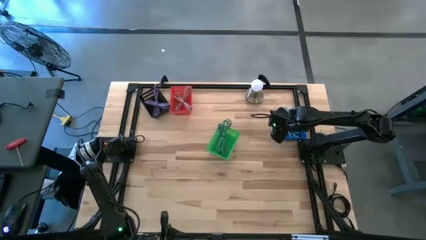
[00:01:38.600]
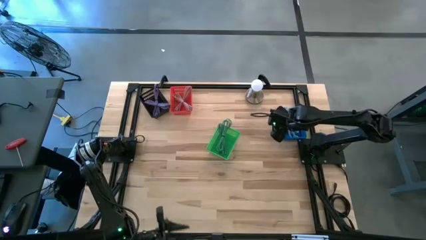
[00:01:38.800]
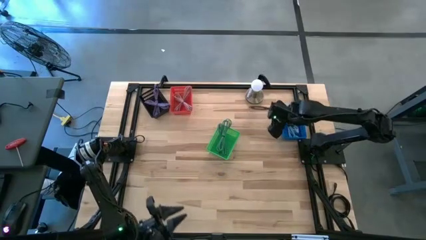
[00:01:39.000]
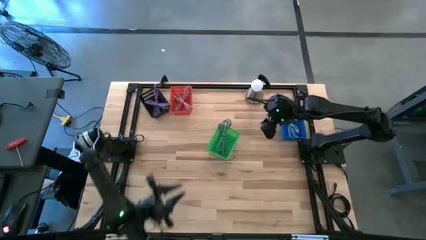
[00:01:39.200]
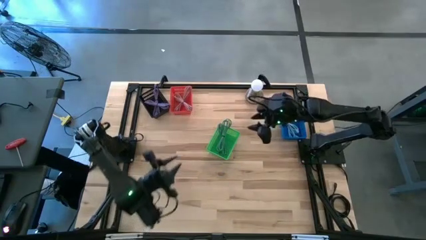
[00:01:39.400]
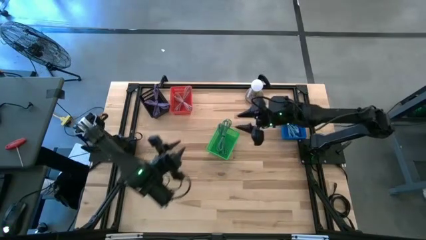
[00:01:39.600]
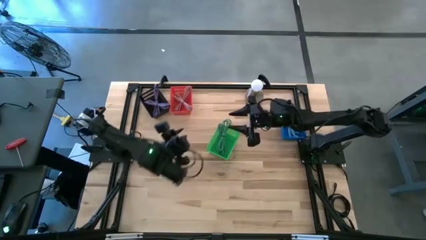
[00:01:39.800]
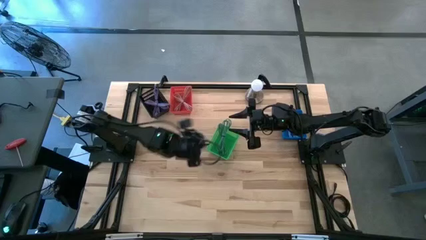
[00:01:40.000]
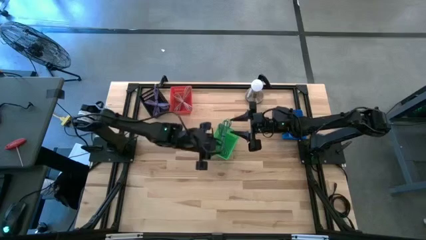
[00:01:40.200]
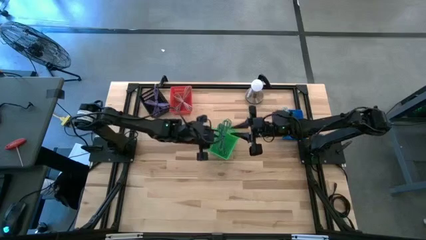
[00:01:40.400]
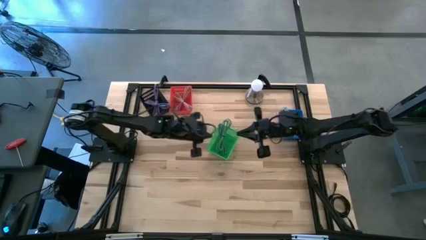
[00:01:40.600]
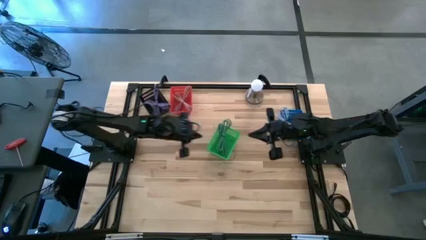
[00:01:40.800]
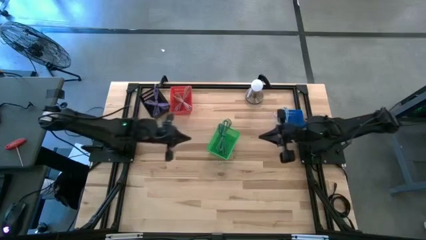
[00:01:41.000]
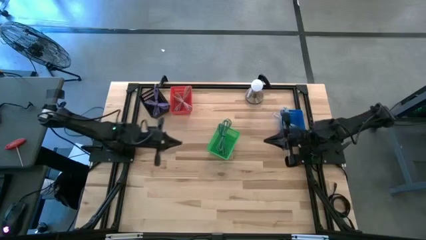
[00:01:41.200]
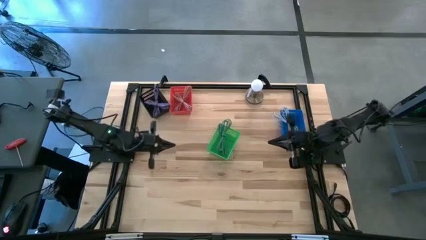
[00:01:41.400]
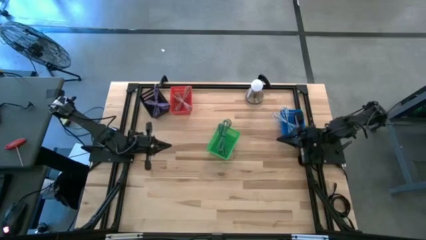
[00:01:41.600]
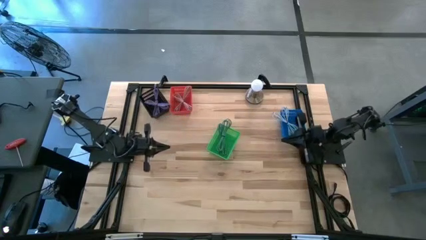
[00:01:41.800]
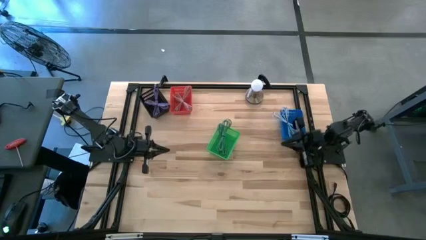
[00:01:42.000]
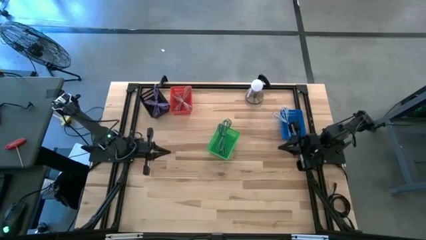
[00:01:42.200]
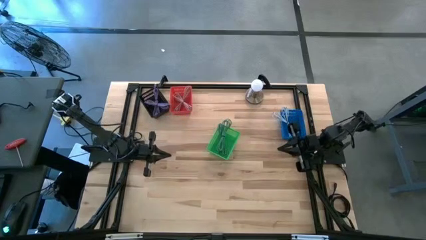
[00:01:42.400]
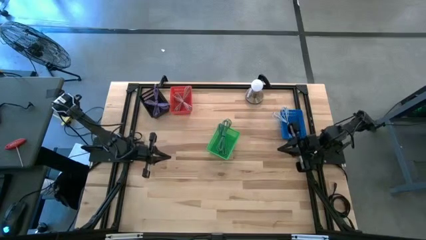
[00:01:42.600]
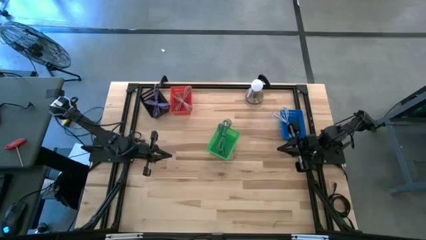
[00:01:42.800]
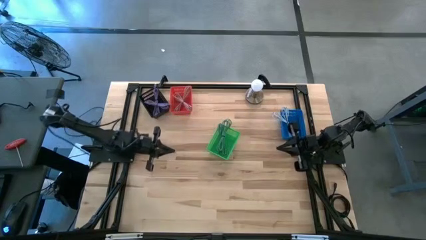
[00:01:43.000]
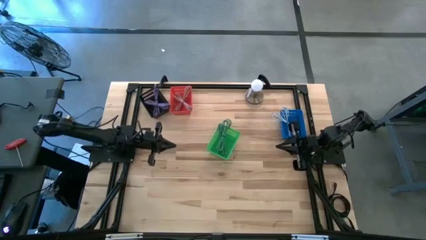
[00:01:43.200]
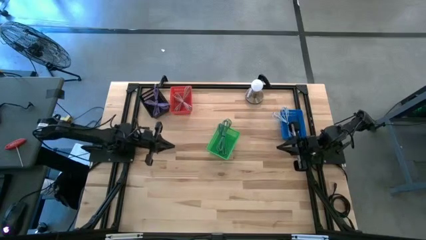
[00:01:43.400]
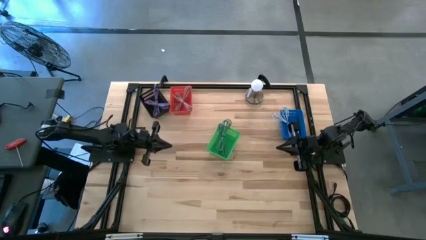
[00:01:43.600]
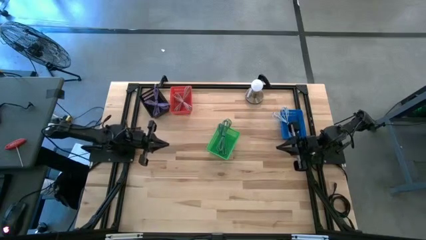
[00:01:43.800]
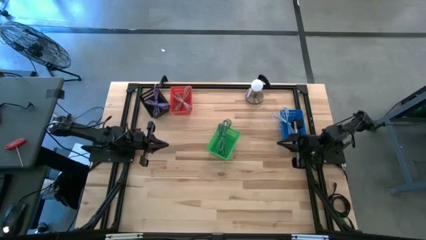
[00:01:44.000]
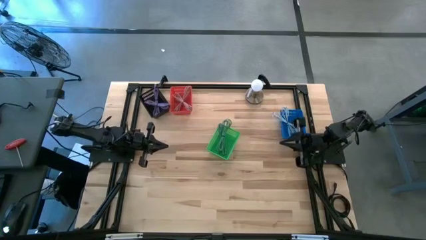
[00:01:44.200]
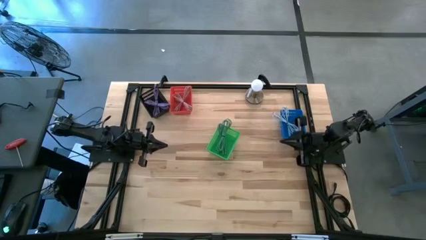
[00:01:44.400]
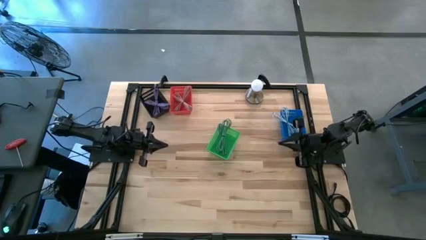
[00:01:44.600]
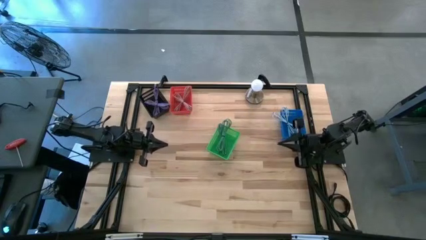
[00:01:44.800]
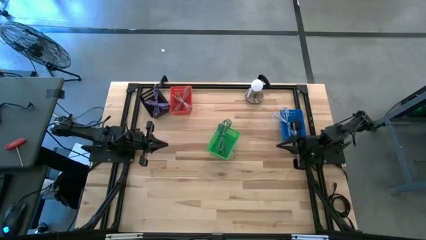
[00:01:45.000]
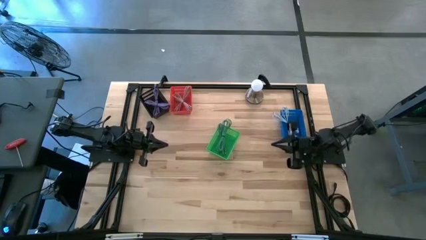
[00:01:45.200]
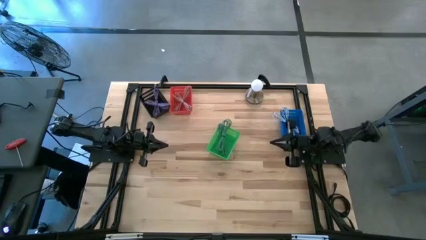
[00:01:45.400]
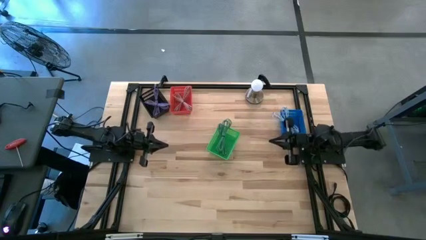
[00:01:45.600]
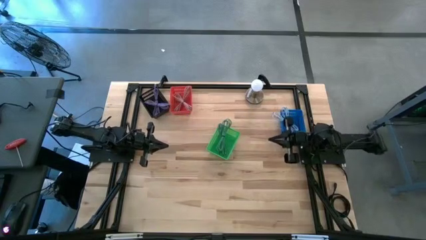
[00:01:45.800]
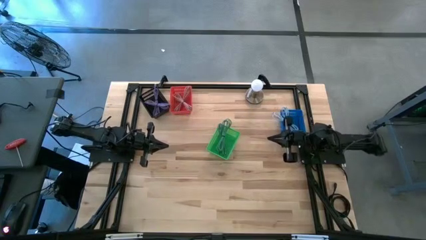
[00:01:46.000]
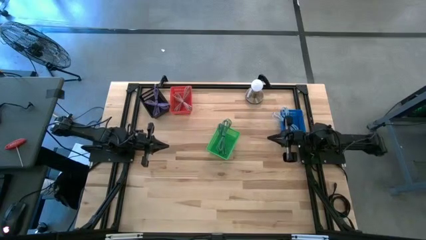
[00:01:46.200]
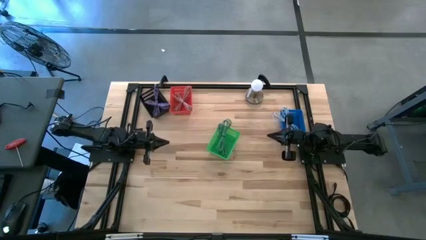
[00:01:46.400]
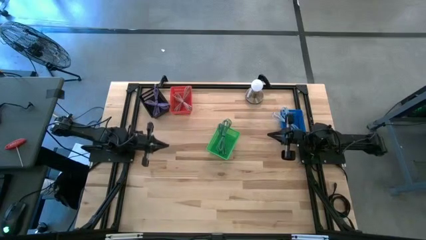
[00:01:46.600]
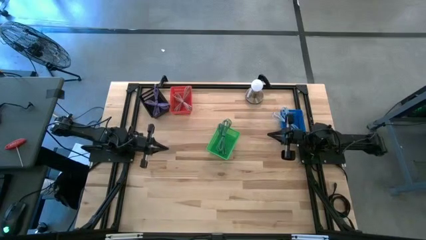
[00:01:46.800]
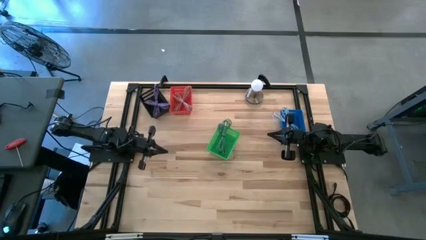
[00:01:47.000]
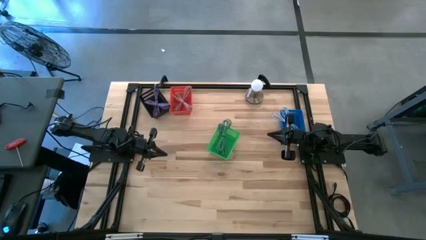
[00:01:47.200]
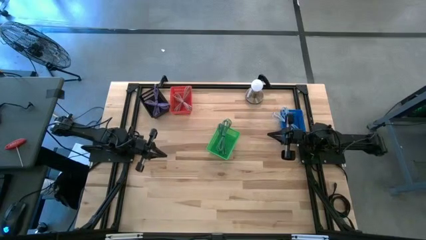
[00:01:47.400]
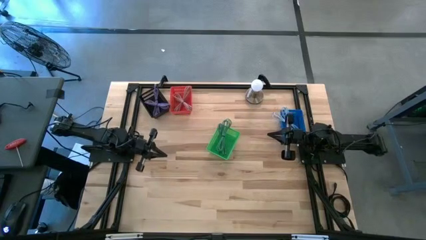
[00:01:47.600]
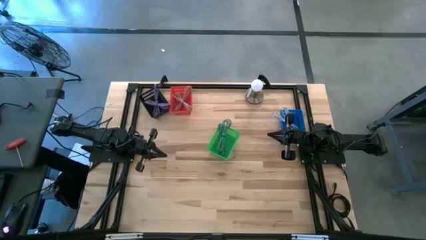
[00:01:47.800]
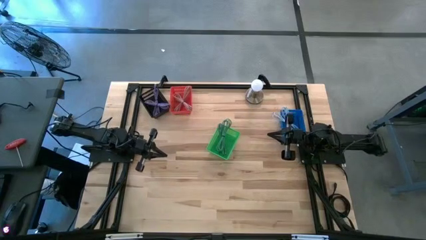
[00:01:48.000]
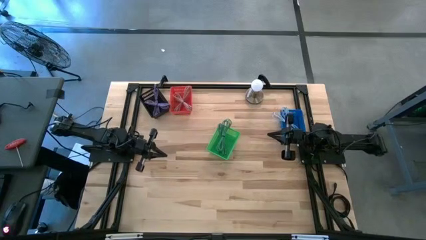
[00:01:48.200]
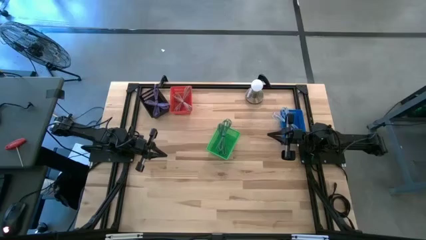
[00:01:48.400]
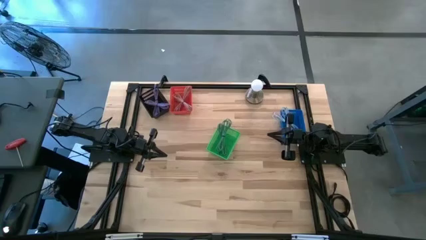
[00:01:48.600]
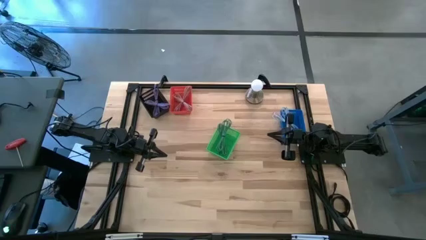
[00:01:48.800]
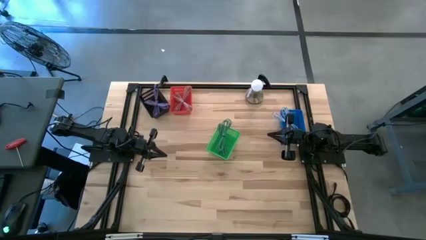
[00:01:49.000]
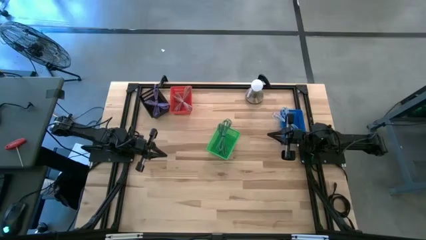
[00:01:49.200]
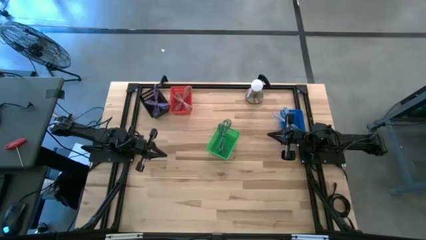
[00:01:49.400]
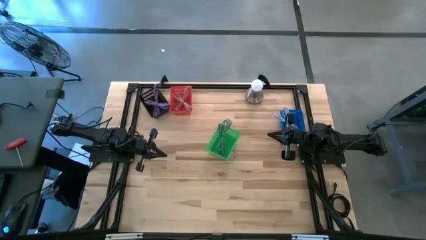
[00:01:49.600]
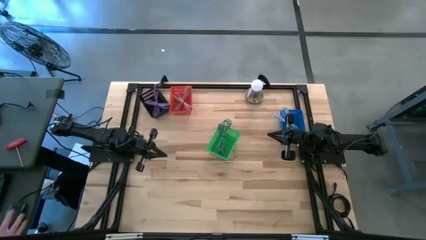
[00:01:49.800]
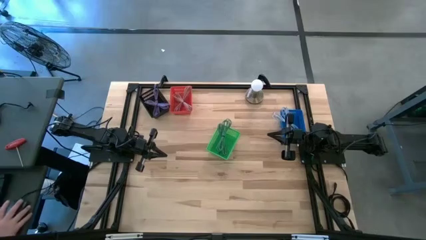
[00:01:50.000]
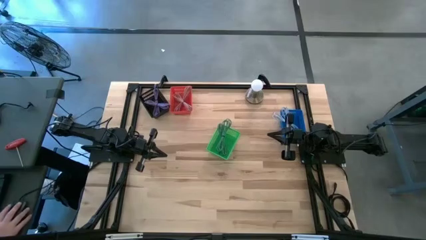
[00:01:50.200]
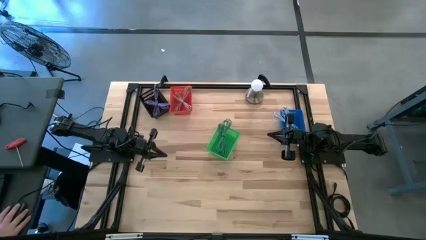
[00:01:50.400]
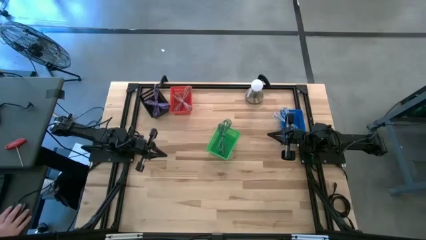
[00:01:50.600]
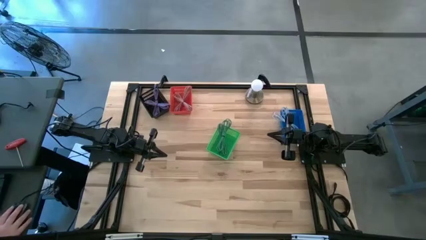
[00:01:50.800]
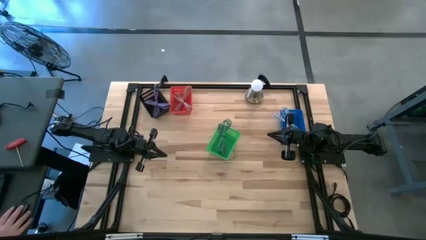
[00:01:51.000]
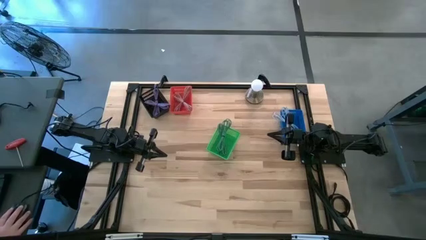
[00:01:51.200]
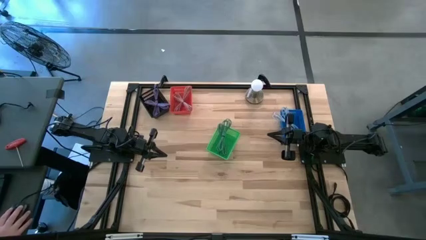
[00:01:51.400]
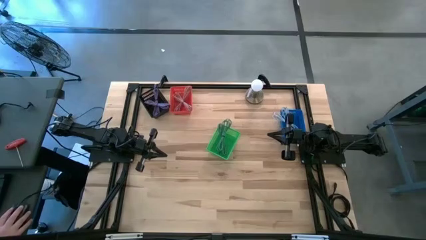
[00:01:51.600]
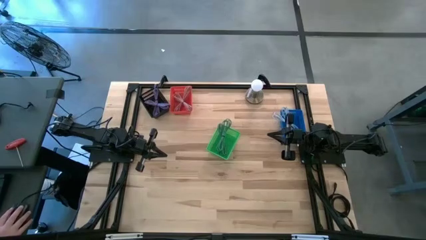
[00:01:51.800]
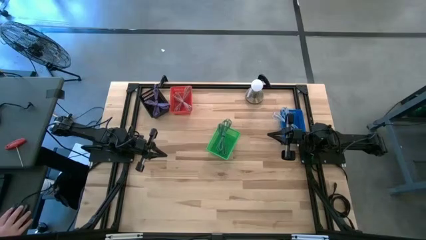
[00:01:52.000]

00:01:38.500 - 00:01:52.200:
Task: Pick & Place USB Port
Return to Home Position

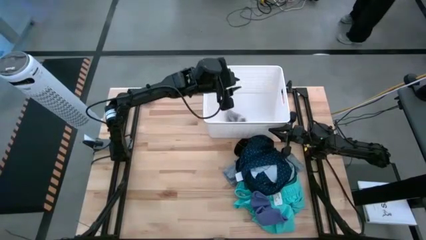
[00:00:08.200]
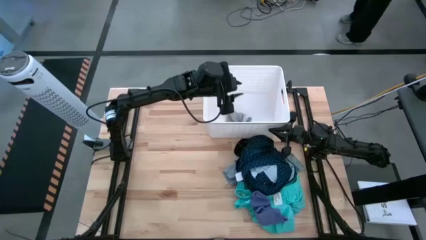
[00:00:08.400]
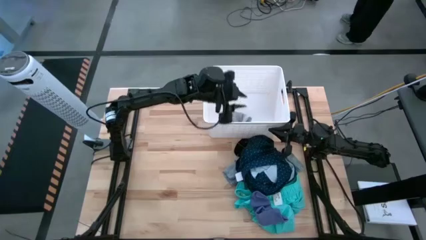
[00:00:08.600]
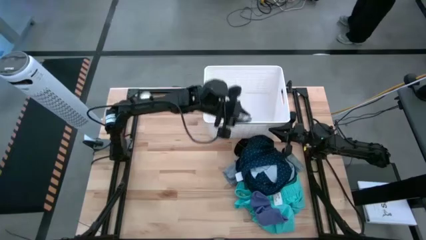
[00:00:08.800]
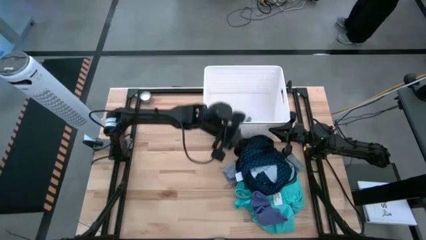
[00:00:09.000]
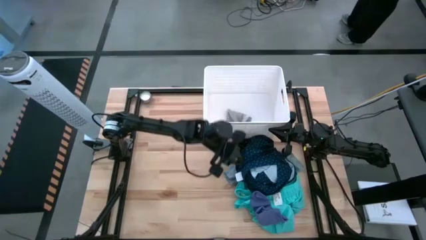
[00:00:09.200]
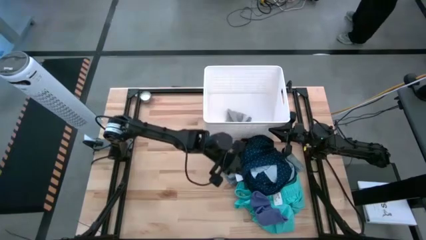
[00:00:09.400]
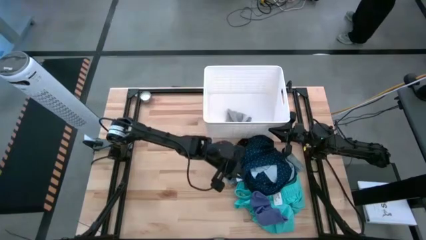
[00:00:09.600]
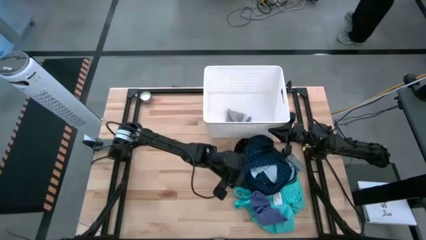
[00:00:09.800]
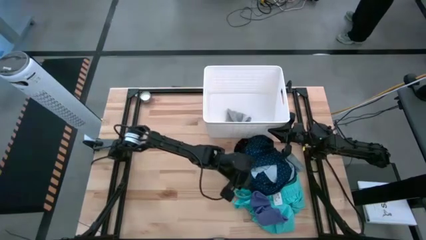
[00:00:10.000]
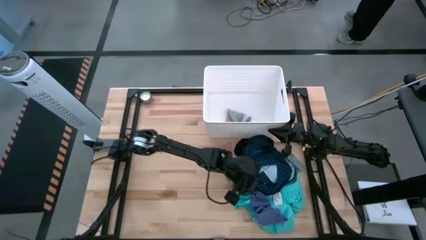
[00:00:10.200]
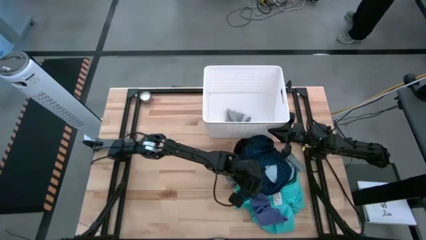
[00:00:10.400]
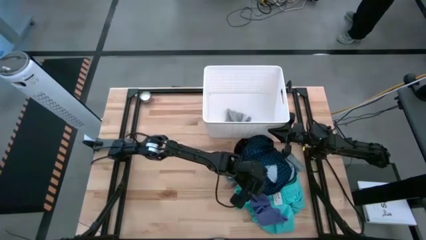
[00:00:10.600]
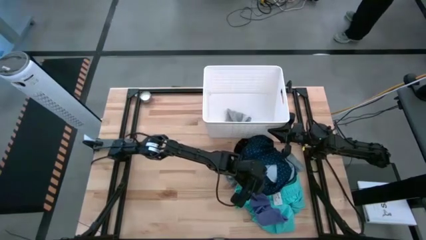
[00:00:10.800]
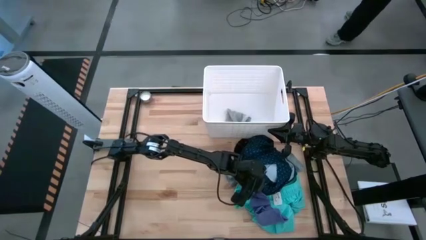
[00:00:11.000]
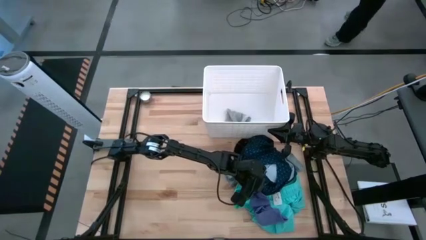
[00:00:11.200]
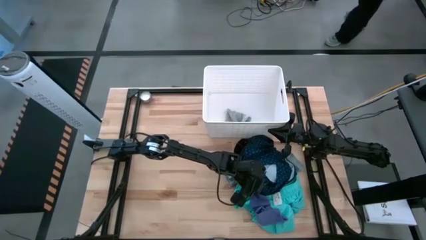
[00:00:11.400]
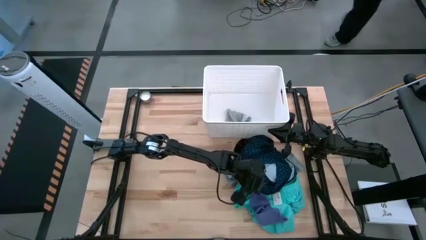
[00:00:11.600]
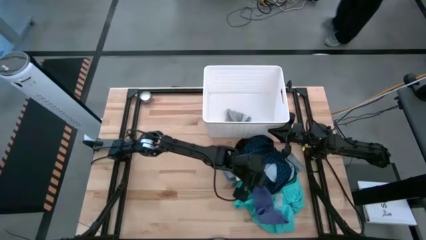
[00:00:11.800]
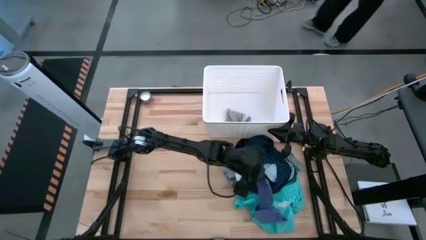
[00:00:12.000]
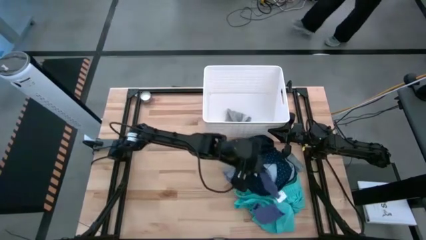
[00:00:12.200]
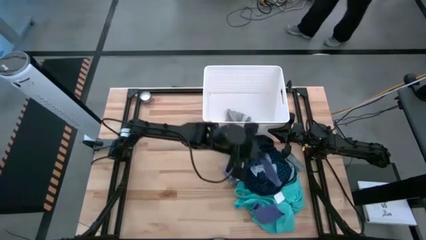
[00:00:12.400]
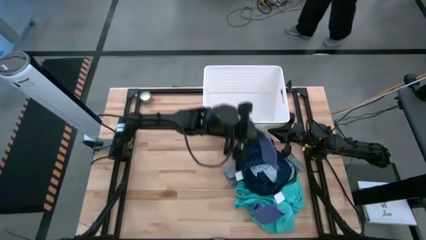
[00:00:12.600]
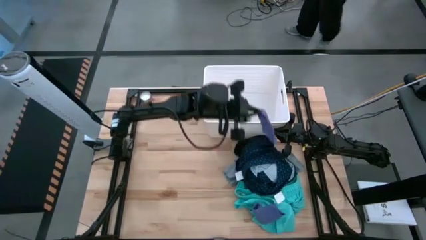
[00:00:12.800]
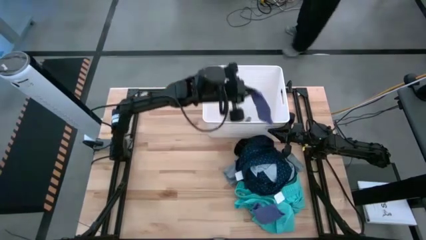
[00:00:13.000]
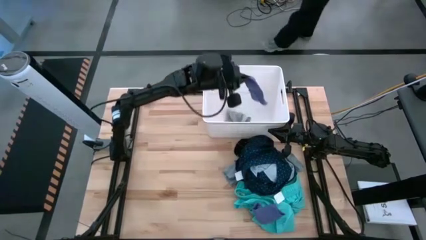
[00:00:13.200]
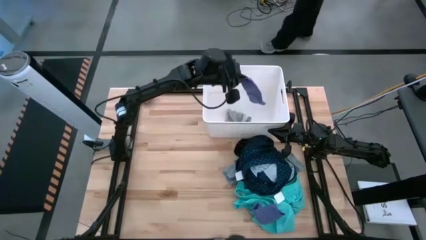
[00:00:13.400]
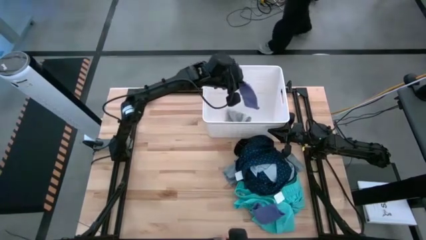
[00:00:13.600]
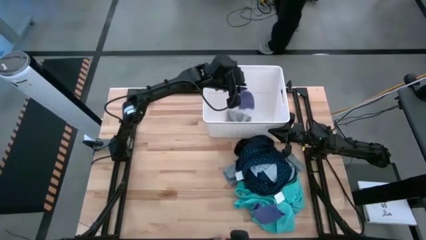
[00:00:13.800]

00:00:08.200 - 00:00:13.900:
Task: Sort clothes
Put the top purple sock into the laundry bin
